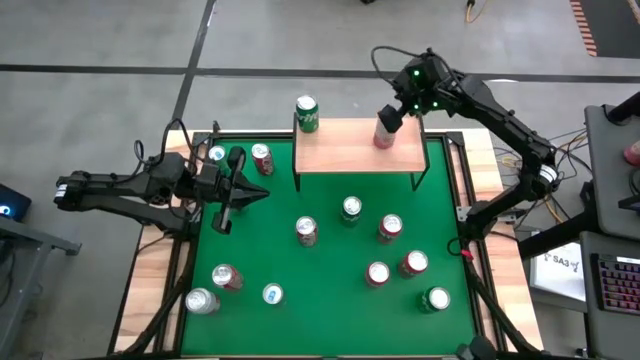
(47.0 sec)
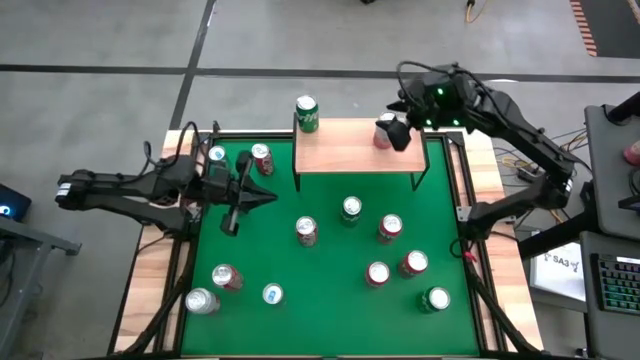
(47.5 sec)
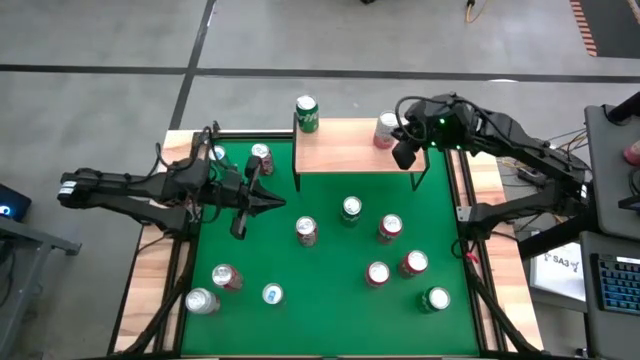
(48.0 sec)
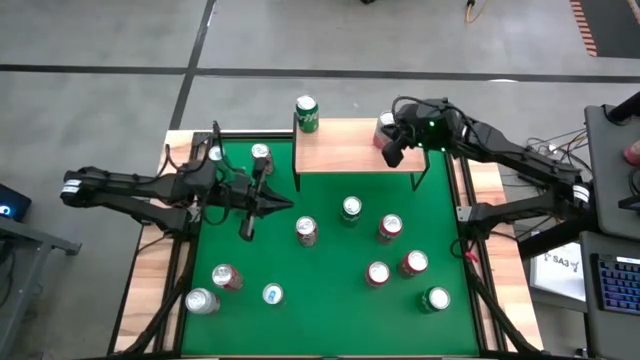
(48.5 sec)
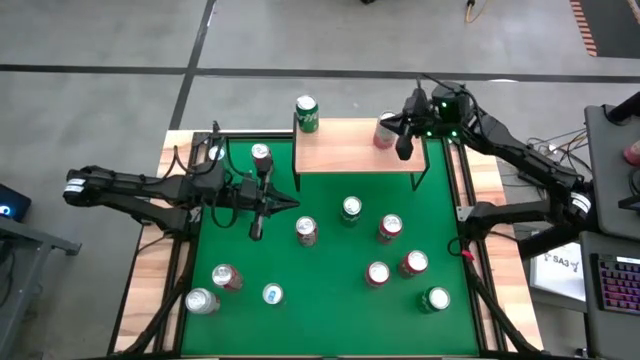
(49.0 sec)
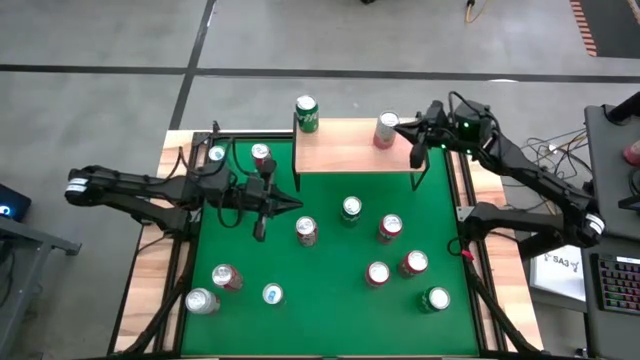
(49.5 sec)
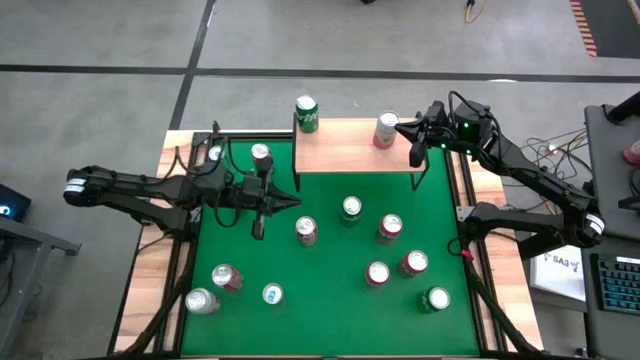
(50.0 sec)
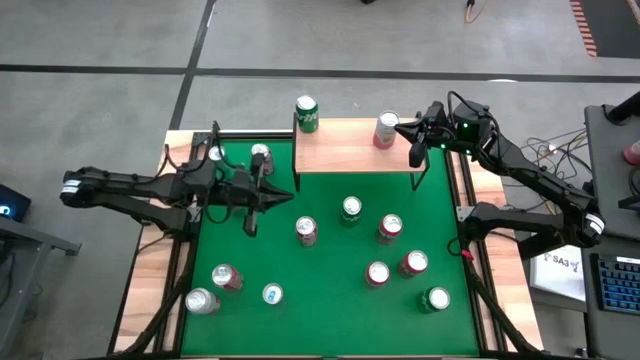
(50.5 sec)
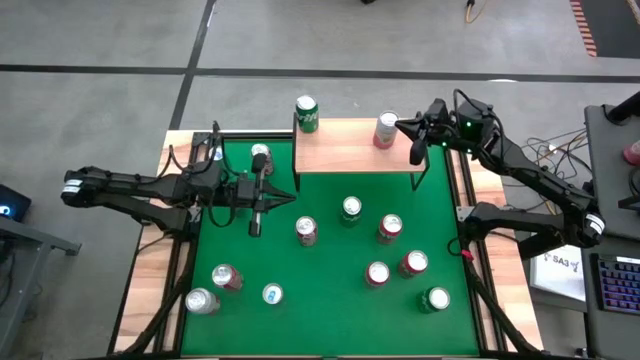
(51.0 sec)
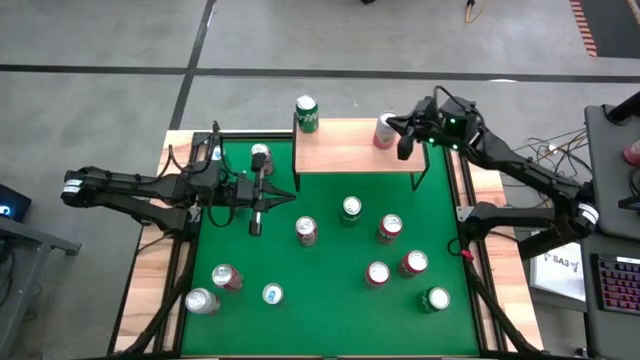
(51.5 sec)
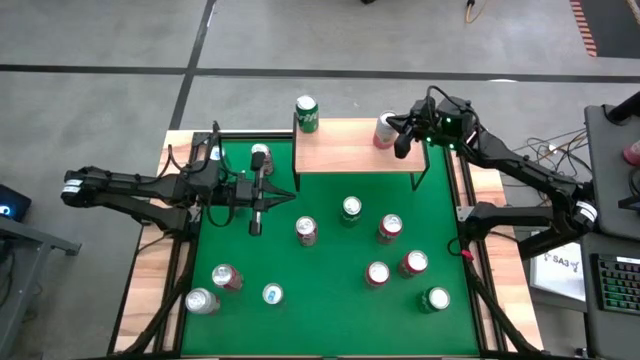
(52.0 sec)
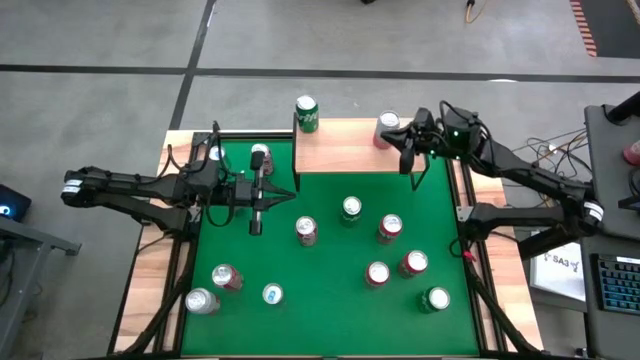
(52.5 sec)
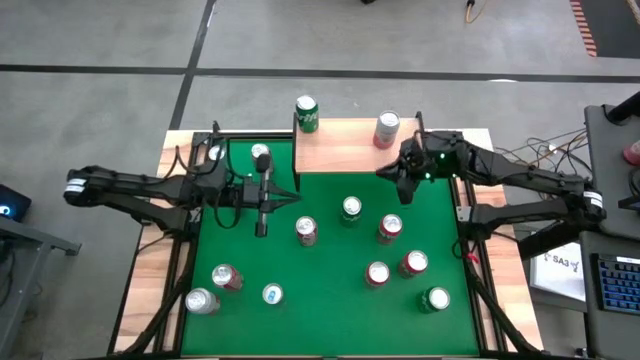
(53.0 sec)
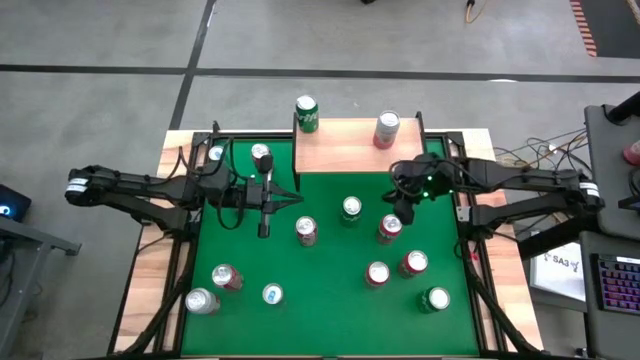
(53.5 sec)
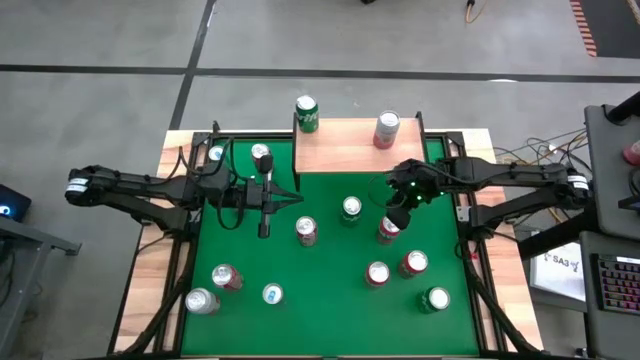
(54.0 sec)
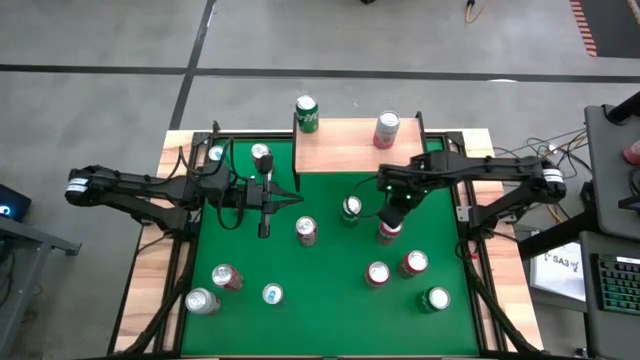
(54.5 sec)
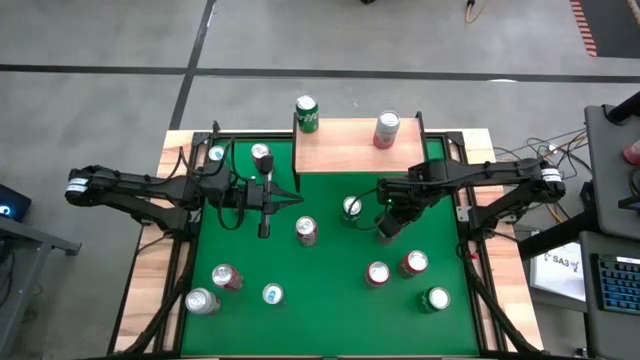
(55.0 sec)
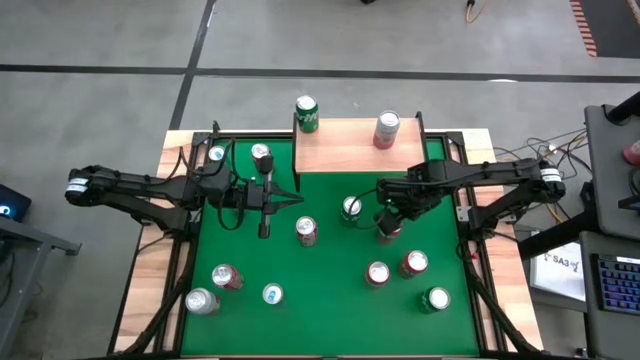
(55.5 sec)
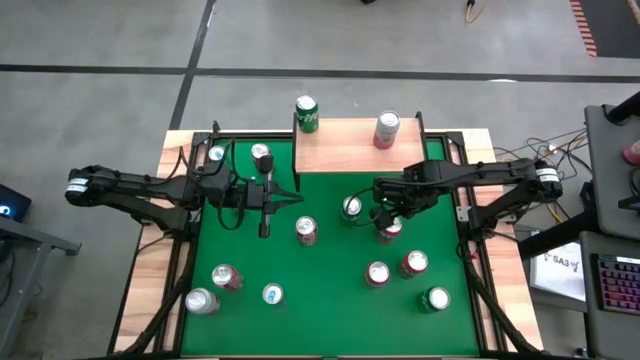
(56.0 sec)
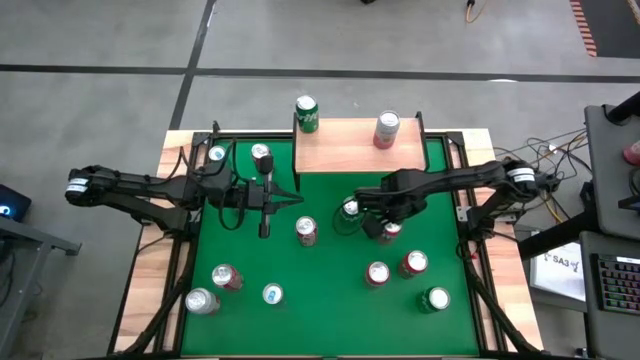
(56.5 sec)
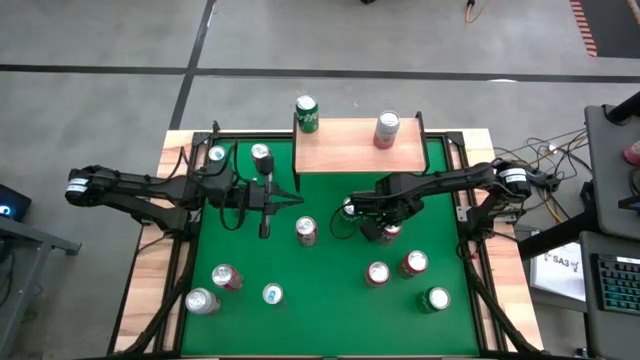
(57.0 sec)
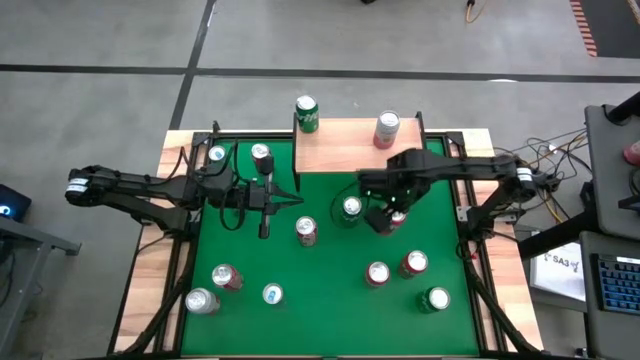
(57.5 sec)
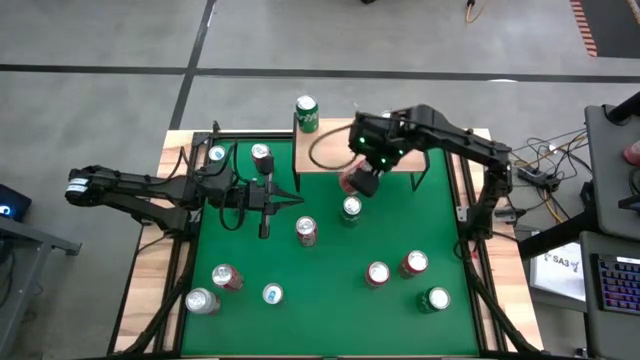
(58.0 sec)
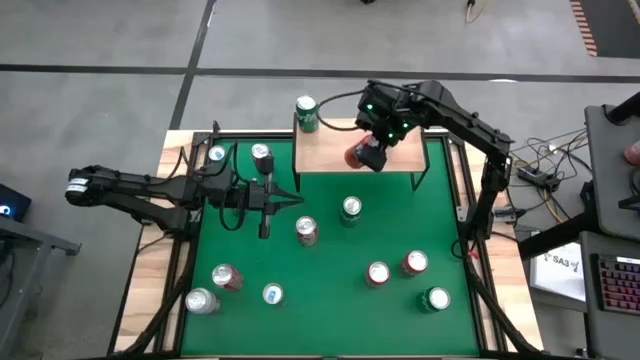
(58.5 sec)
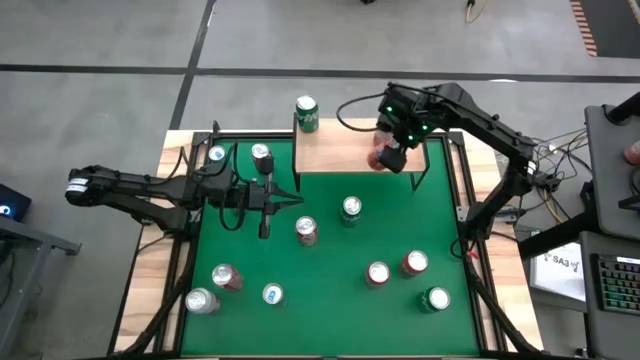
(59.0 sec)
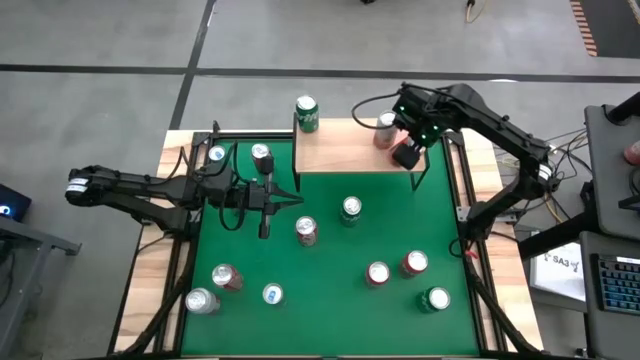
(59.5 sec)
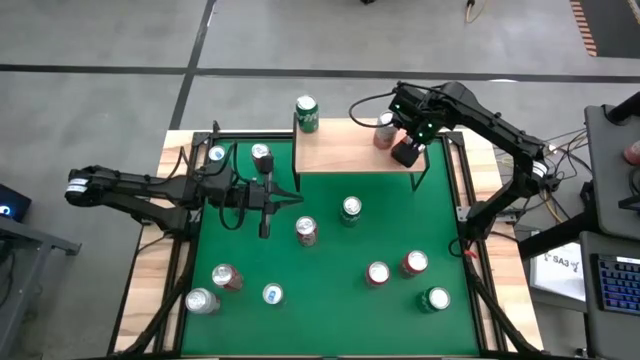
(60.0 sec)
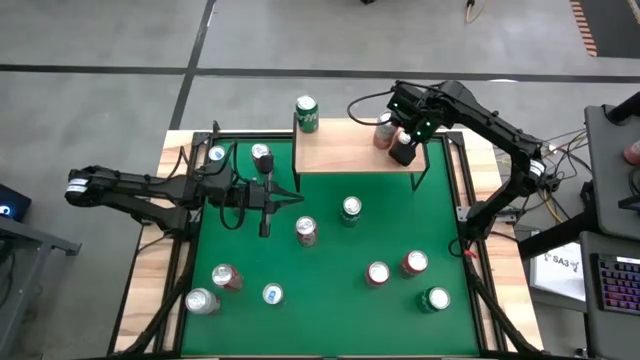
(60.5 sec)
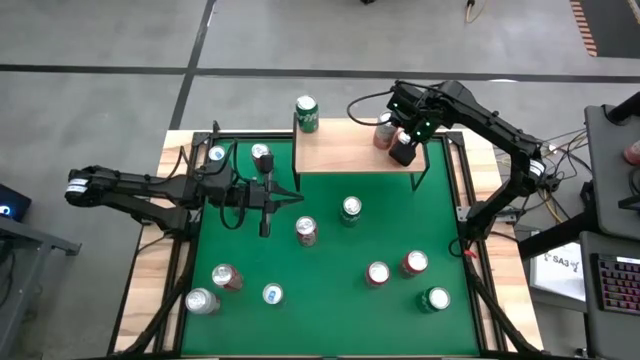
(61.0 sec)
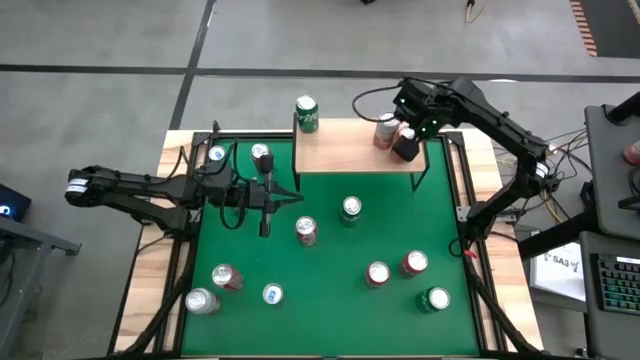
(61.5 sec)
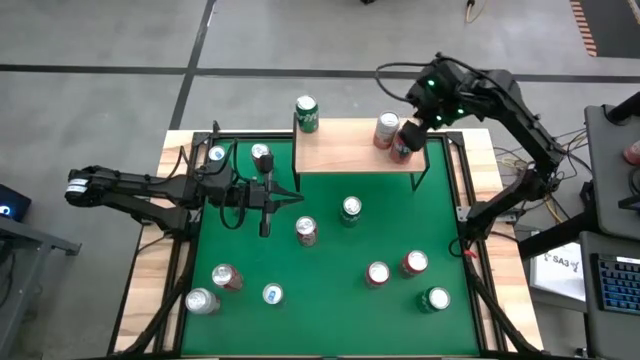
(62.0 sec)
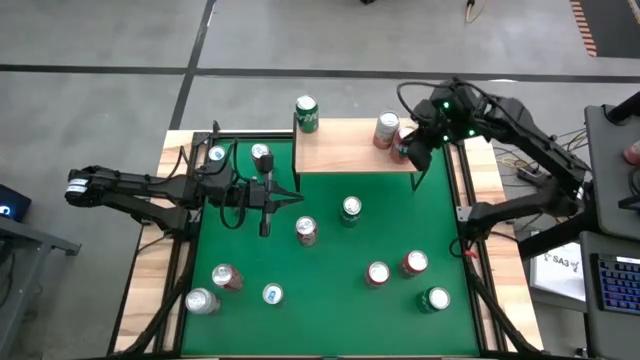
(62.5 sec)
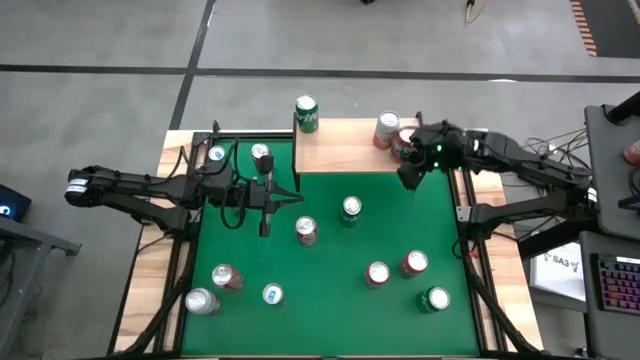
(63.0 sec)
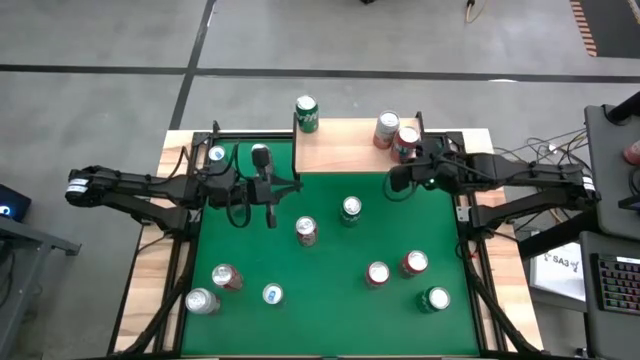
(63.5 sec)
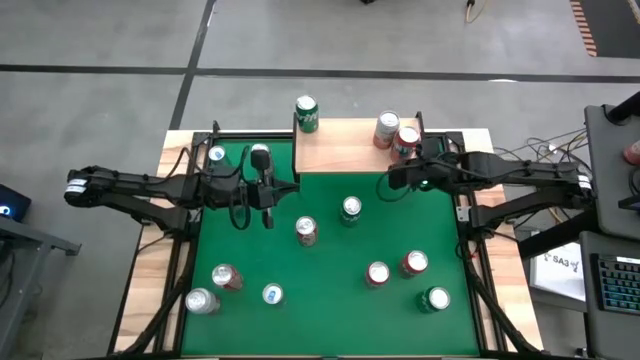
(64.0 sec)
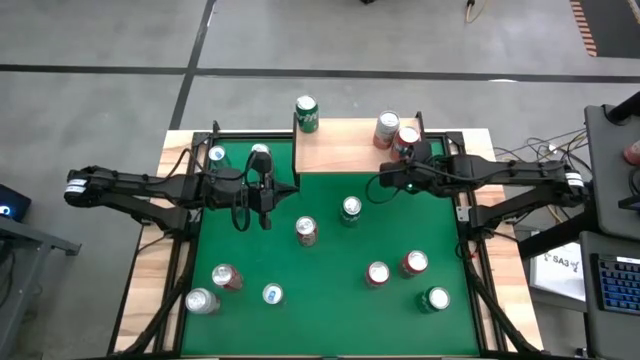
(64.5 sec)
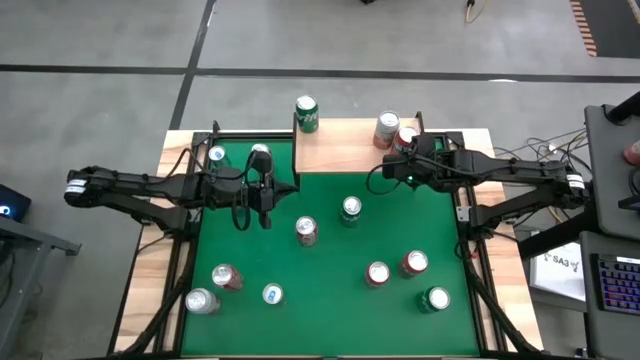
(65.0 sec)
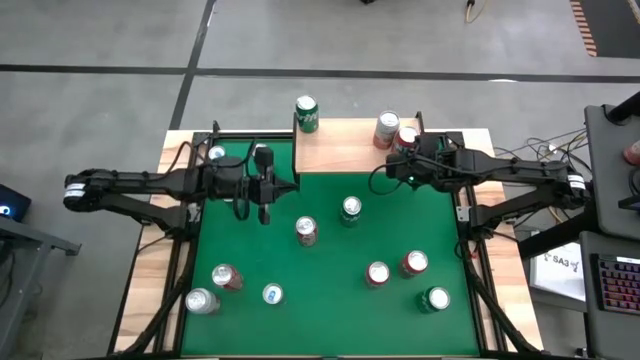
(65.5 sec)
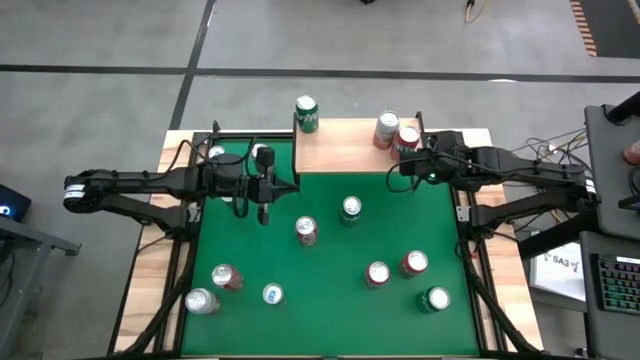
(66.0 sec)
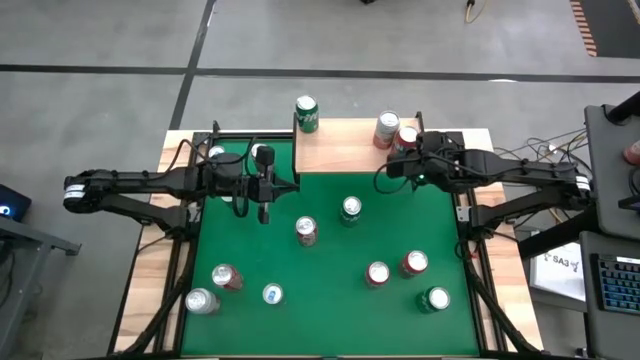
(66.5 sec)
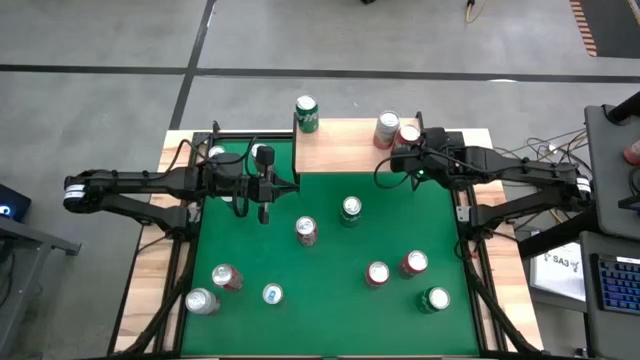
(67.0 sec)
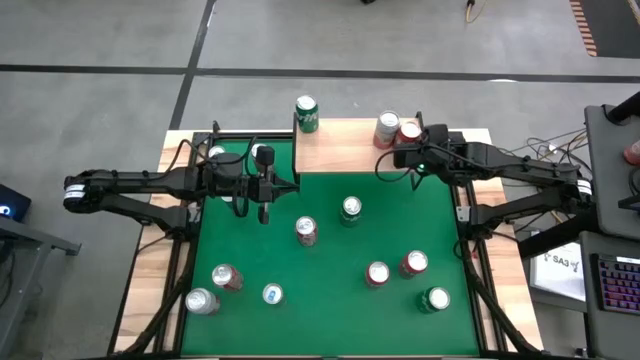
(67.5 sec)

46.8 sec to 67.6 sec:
Task: Place canned beverage on shelf
Put the top red soda can on the shelf
